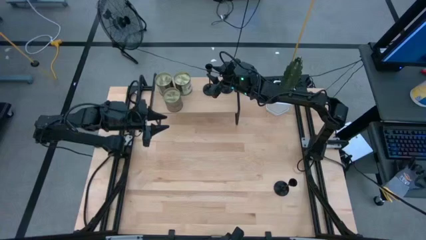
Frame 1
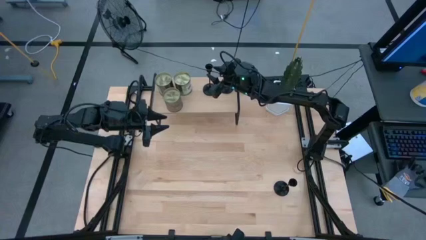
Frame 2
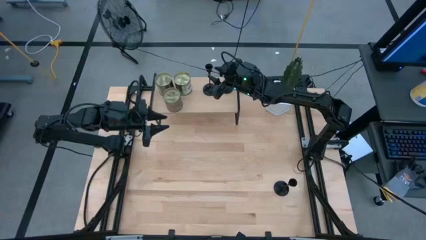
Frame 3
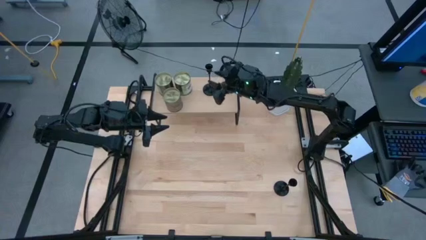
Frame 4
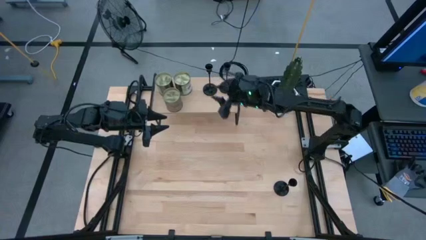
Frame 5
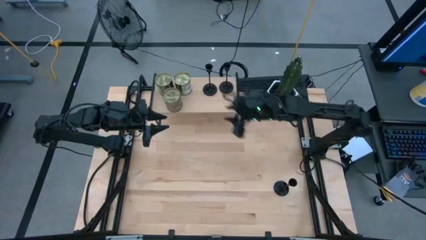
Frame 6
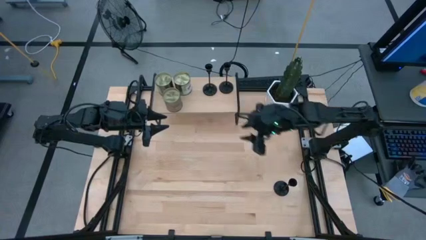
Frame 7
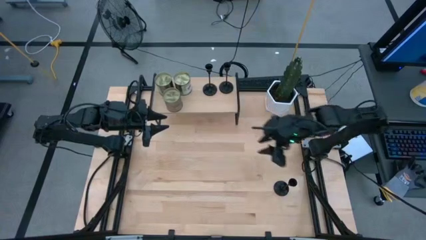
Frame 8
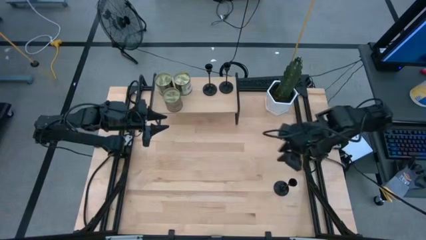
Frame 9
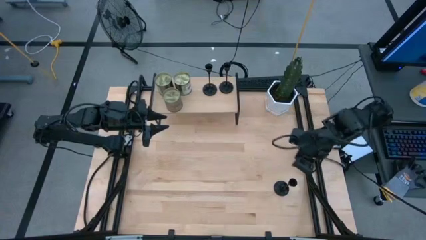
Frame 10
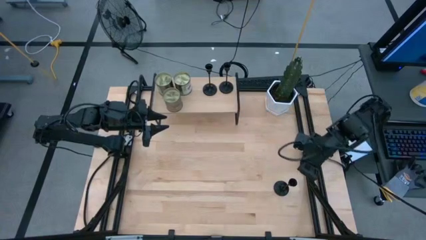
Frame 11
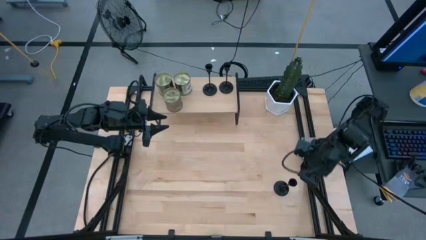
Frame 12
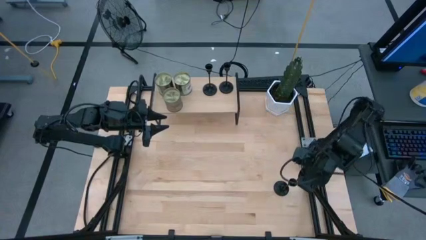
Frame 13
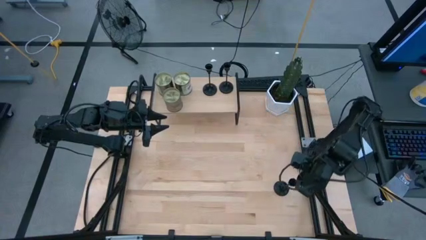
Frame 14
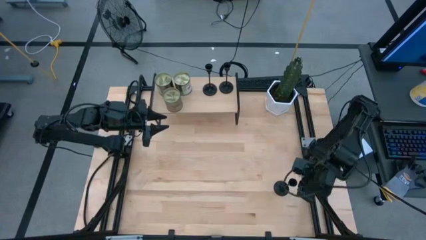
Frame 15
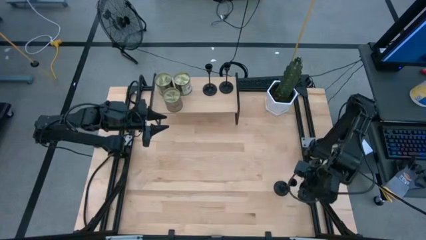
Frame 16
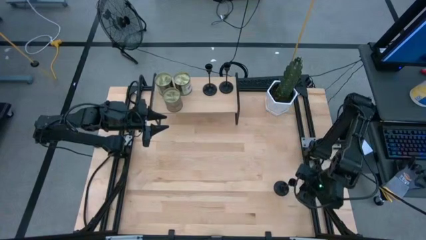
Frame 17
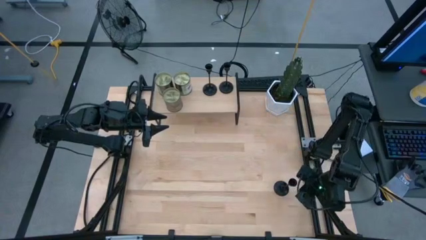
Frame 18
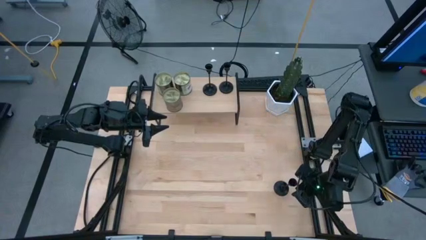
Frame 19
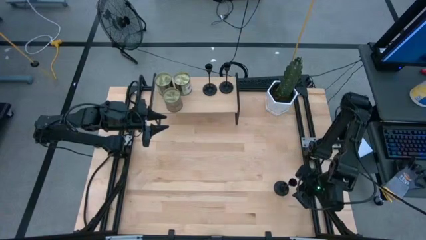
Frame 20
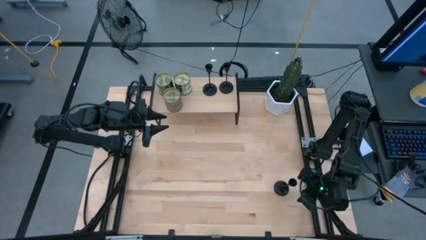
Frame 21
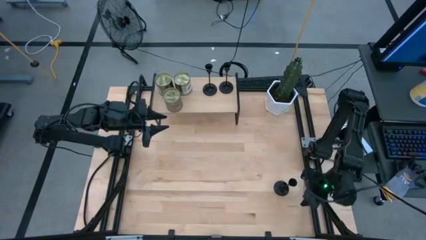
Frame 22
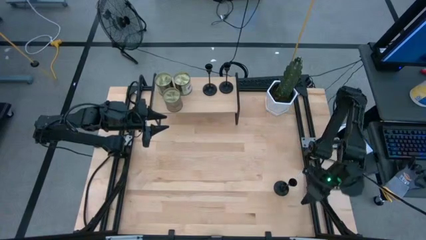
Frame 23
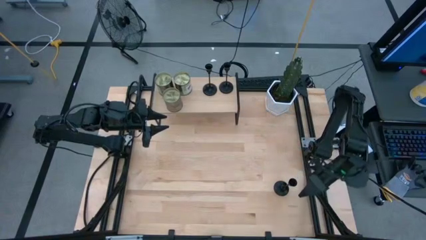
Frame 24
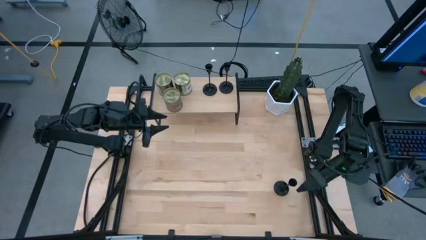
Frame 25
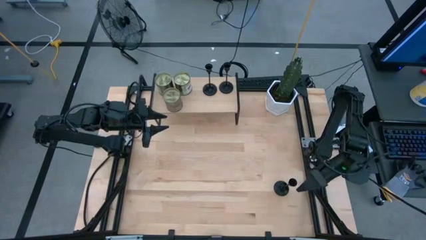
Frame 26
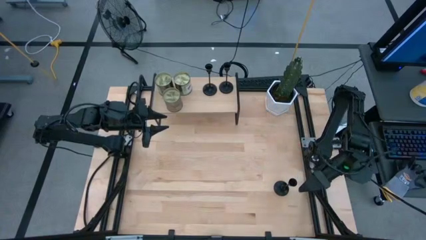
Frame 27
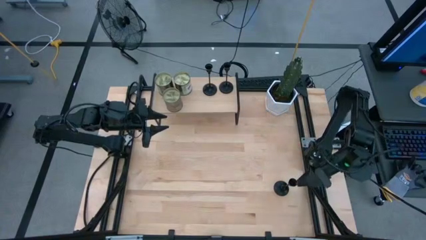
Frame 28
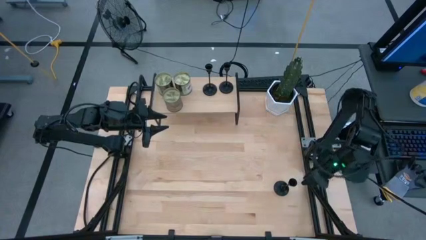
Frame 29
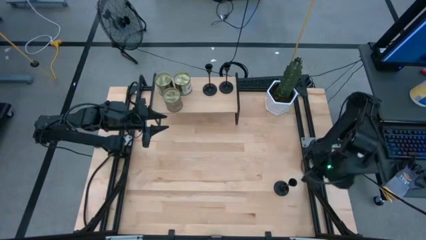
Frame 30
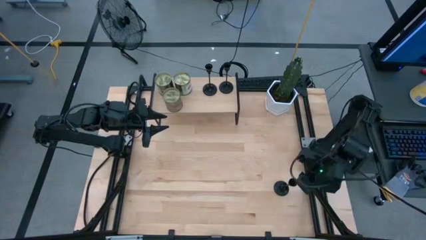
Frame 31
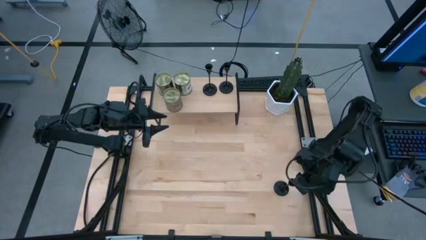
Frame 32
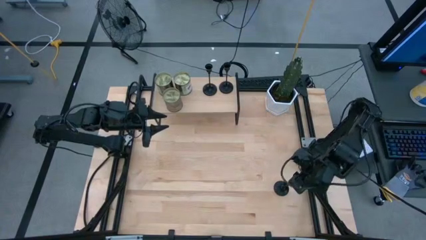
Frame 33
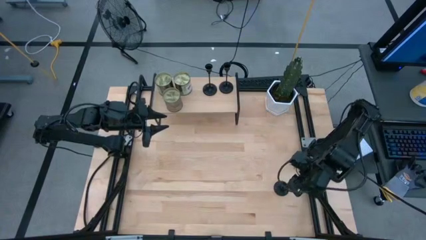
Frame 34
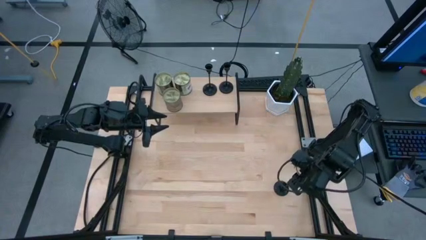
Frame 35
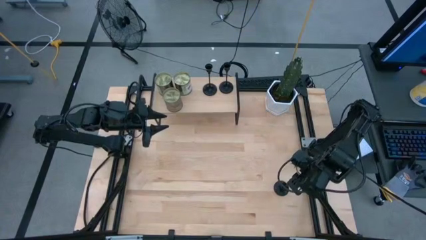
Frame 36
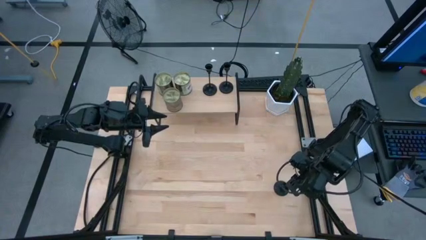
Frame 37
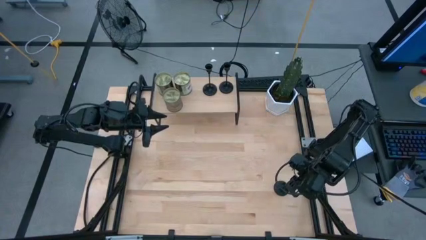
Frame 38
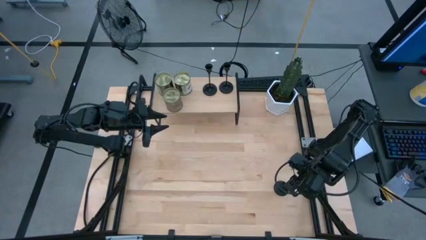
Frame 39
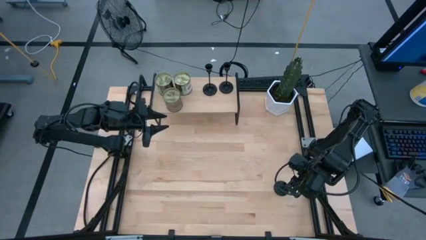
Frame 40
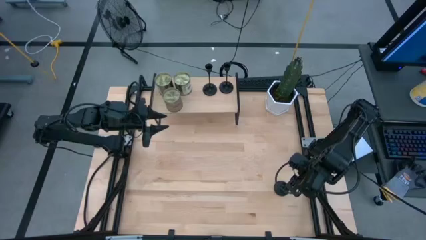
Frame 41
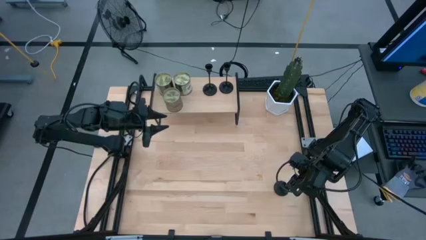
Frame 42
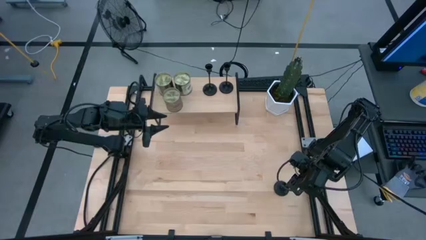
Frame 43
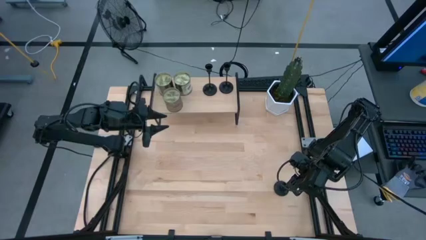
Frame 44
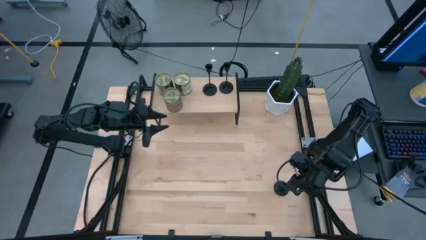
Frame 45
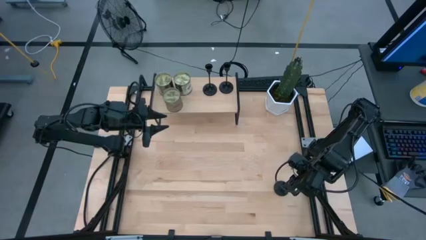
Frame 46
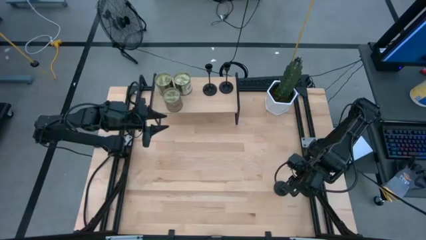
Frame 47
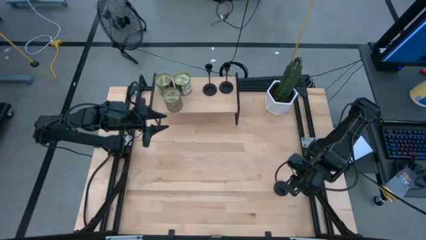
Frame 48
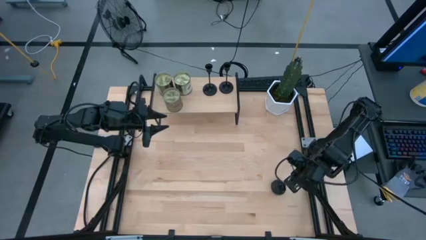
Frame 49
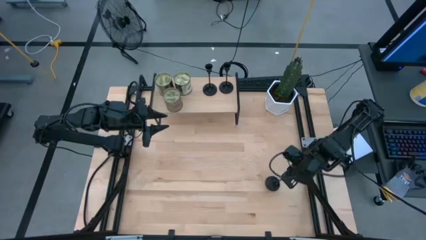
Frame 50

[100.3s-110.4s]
Task: Pick & Place candle stick holders
Put the black candle holder on the shelf

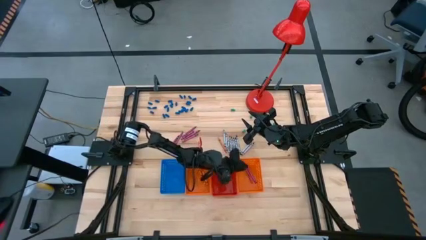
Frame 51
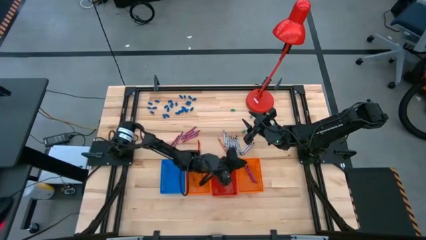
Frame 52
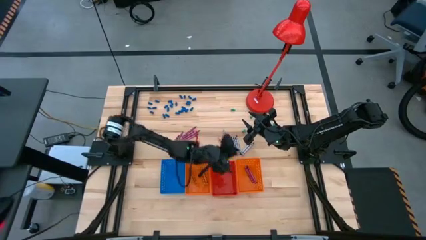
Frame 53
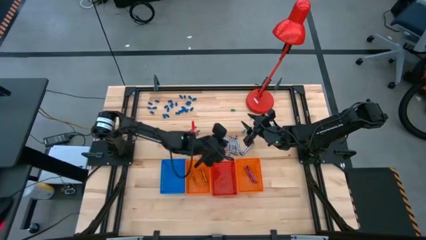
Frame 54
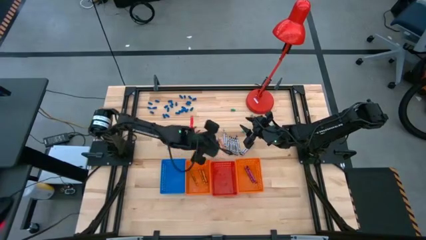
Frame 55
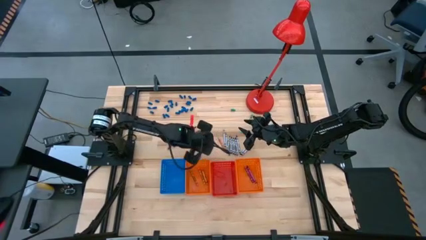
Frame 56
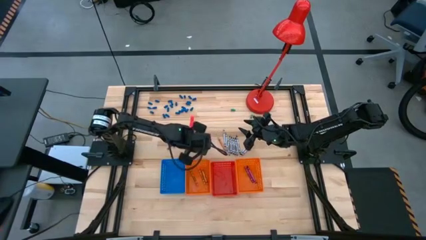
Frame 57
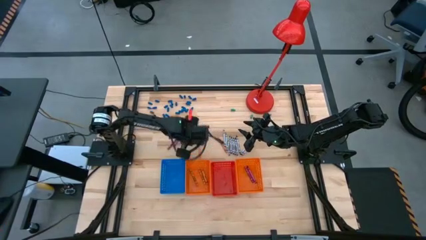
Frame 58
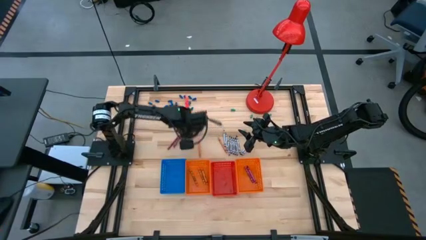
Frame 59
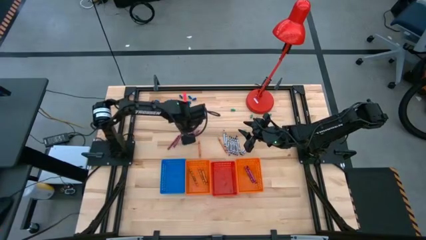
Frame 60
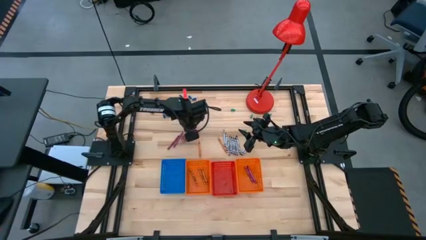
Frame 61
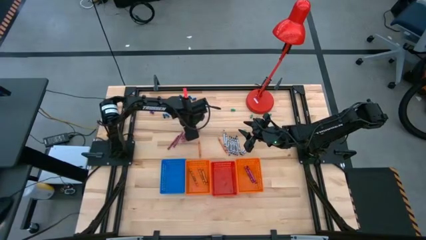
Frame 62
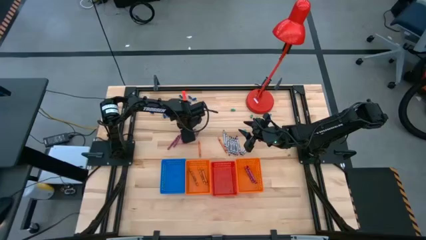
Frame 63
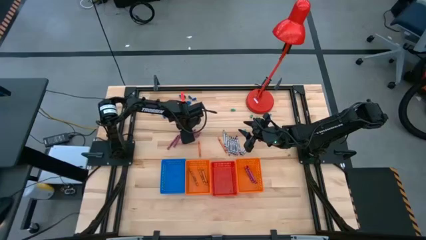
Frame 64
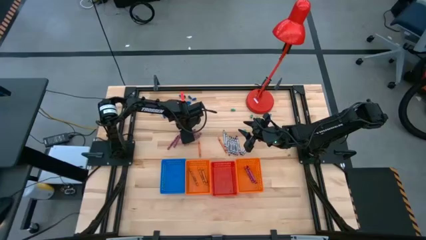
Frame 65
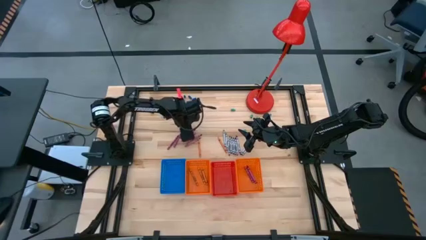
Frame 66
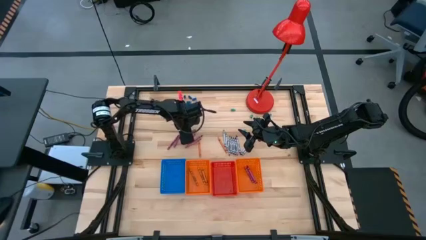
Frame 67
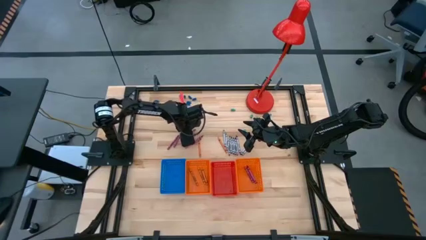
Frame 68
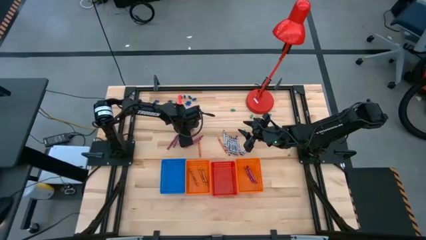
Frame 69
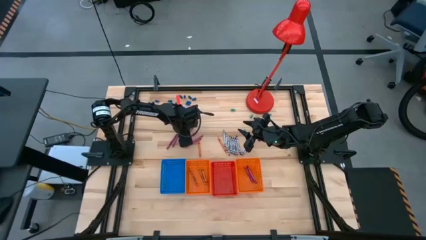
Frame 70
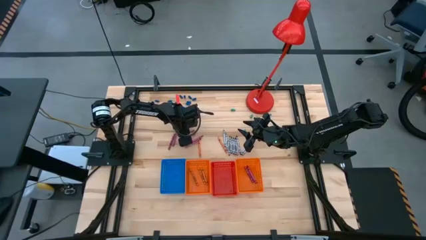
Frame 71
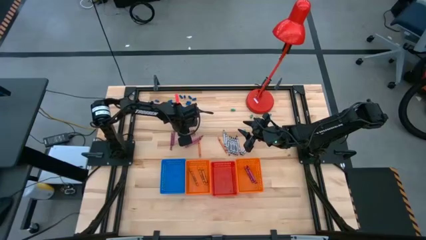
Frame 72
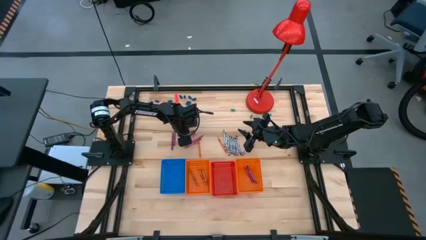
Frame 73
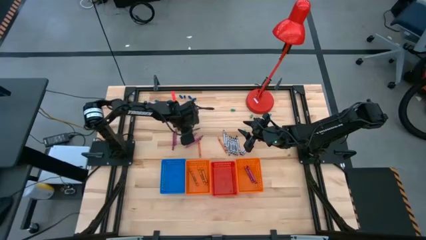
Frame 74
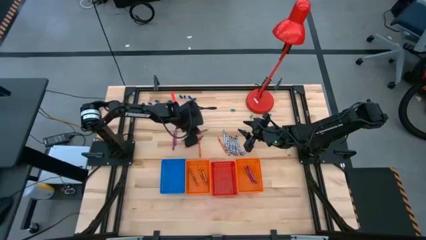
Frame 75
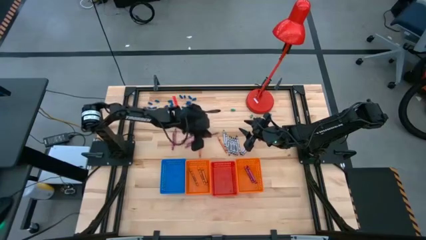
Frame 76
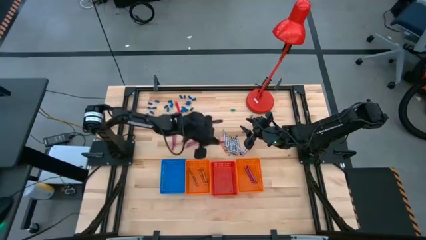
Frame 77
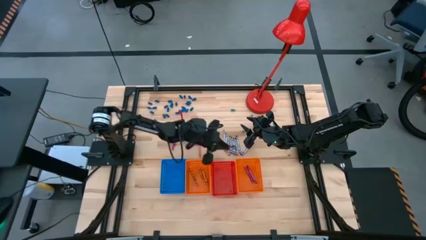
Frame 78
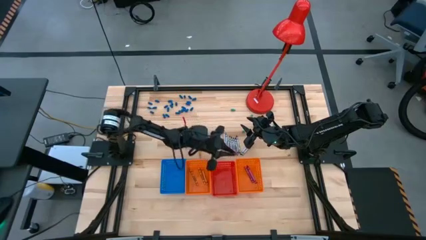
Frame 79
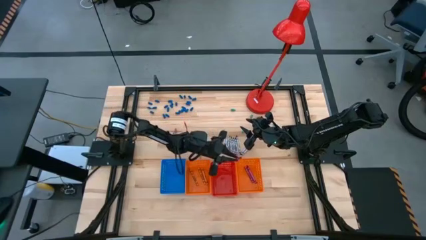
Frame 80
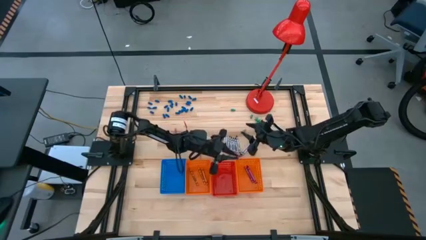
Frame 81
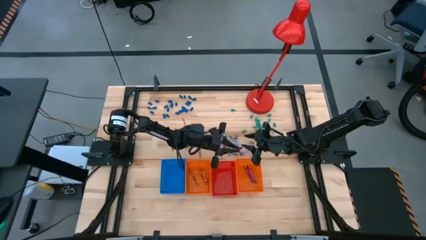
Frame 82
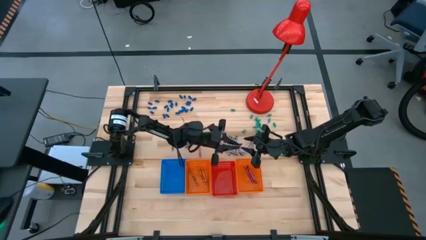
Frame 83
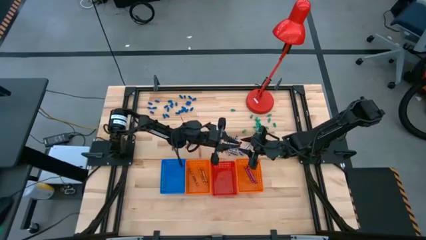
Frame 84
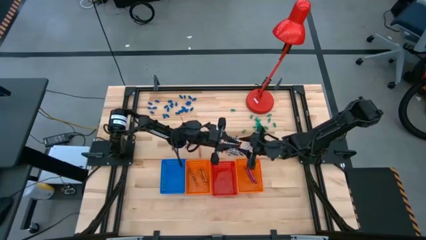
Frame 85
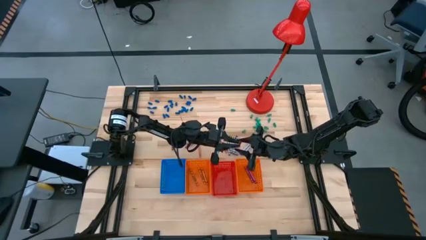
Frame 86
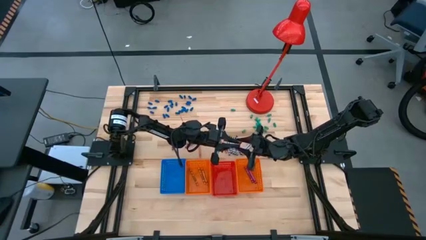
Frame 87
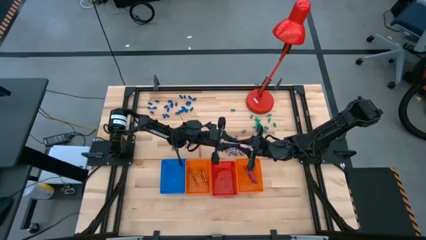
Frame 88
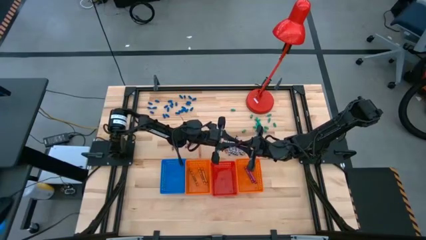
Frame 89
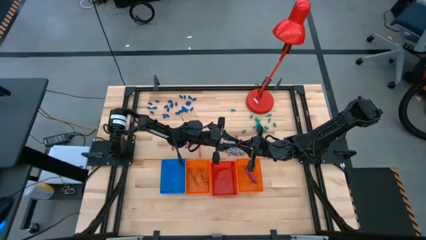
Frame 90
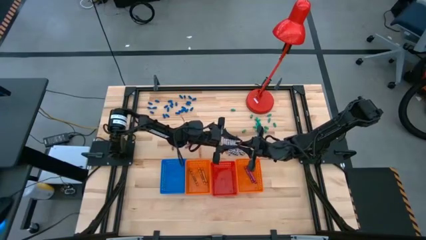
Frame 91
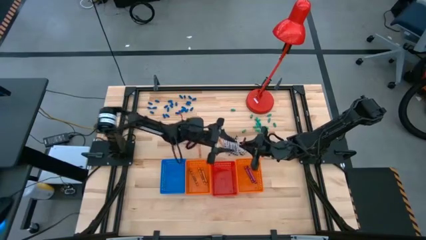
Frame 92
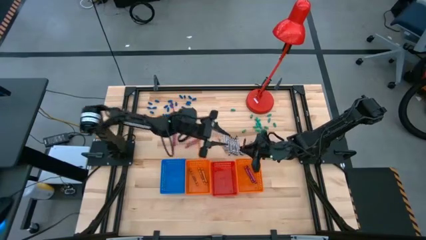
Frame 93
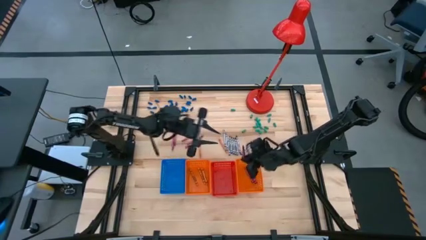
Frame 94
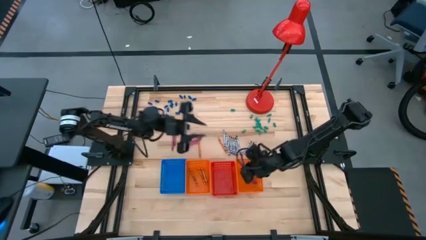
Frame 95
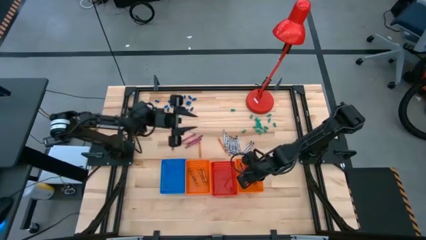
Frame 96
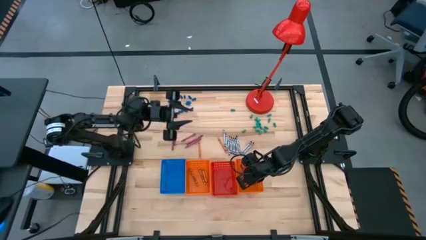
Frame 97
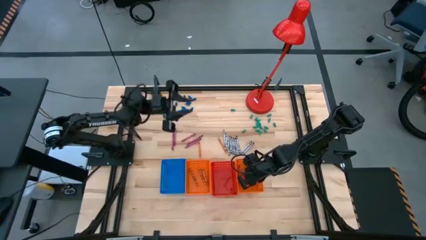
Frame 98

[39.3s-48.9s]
Task: Sort crayons
Put the red crayon into the right orange bin
